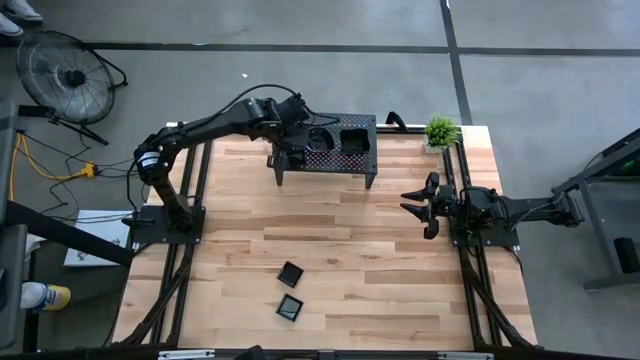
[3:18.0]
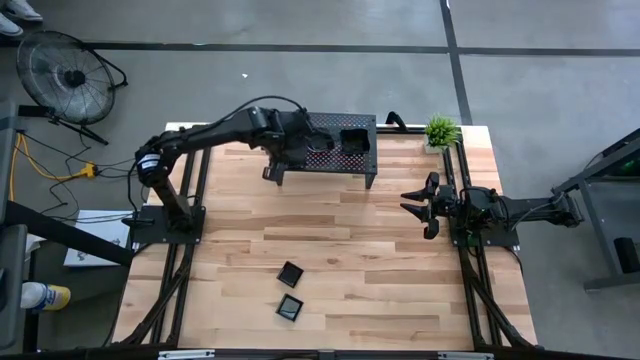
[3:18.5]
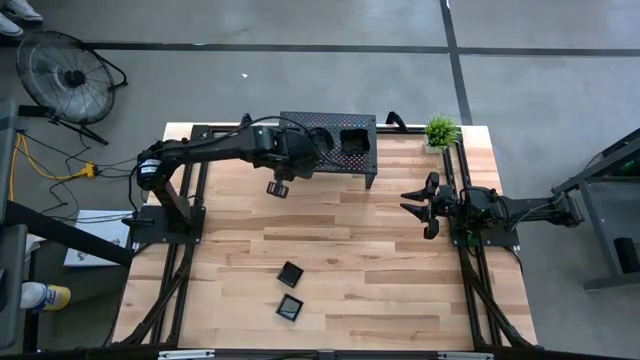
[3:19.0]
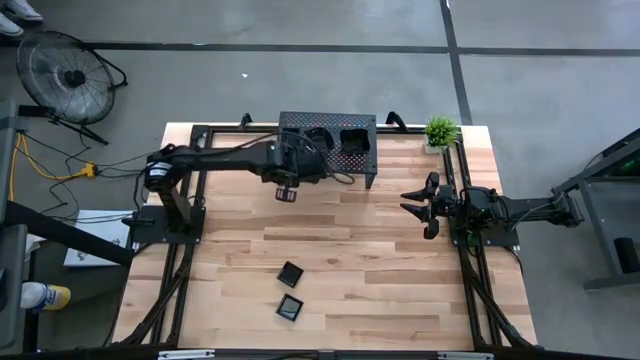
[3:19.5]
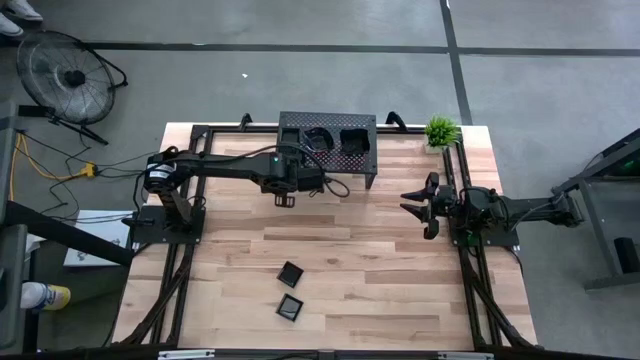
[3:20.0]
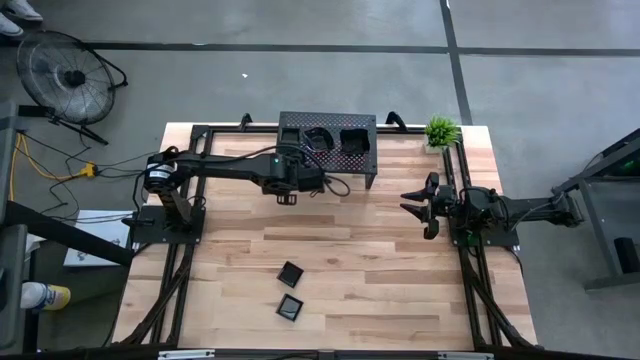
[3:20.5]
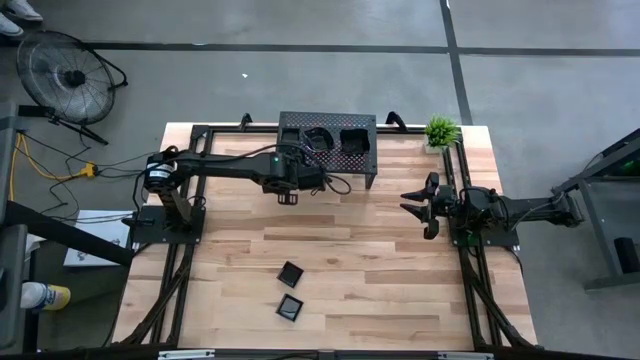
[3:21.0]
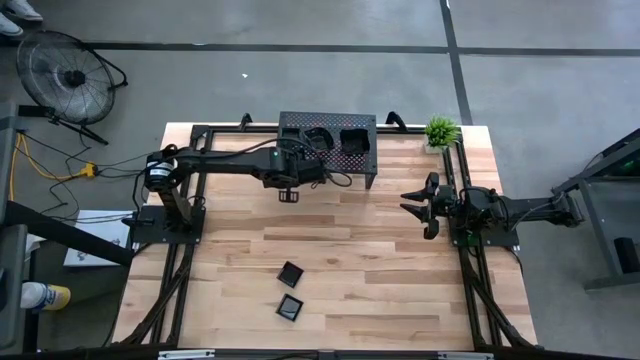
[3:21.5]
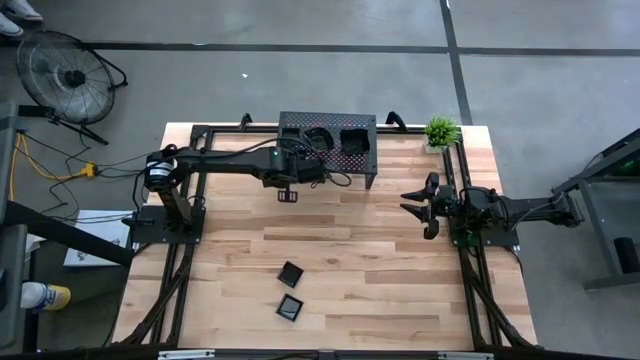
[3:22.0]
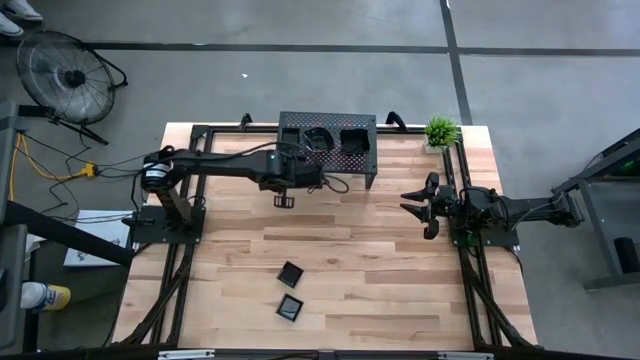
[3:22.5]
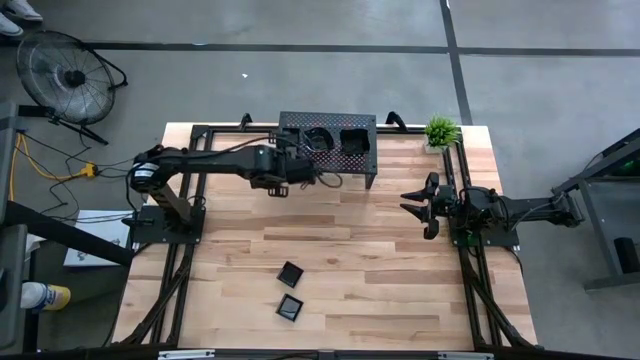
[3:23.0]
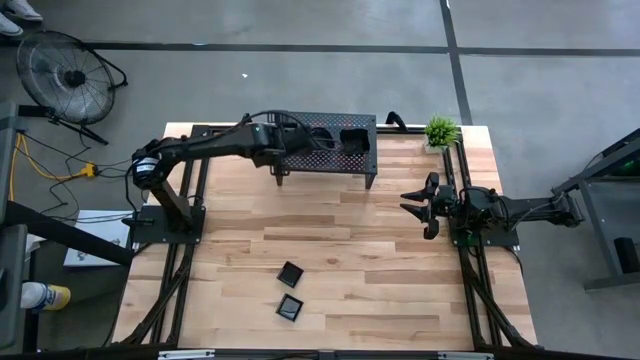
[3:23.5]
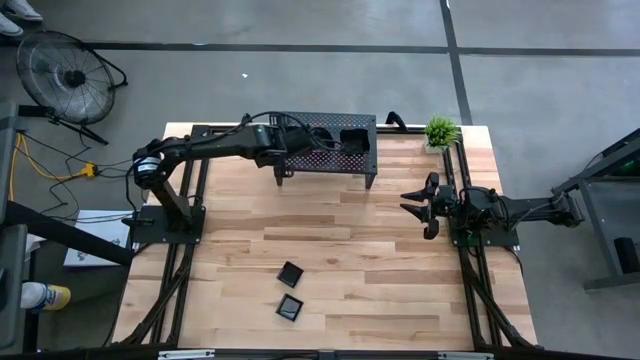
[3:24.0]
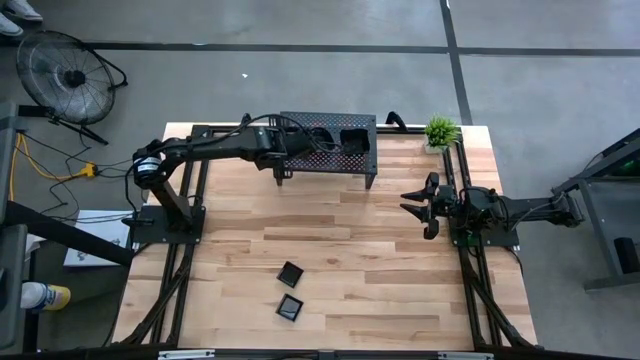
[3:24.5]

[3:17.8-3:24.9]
Task: Pick & Place Mini shaped plates
Stack the top left black square plate on top of the black square plates on the shelf

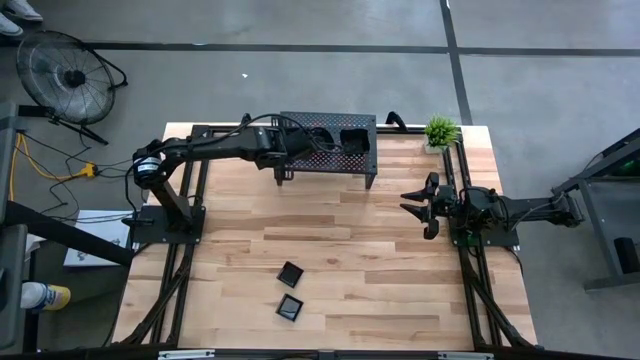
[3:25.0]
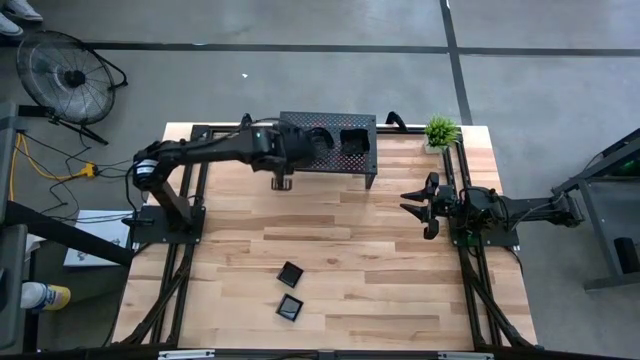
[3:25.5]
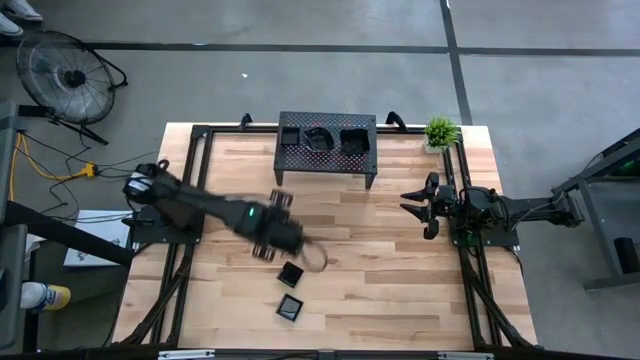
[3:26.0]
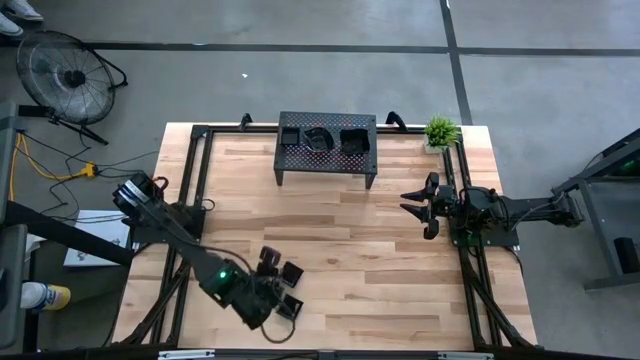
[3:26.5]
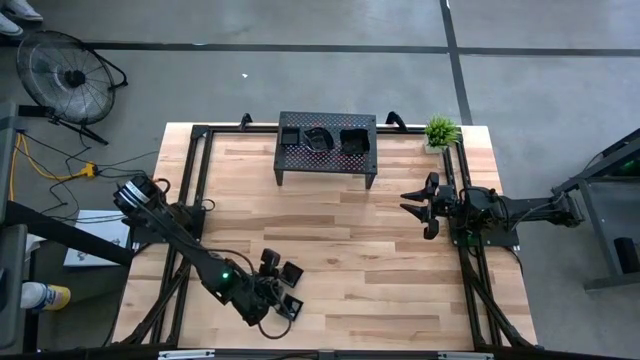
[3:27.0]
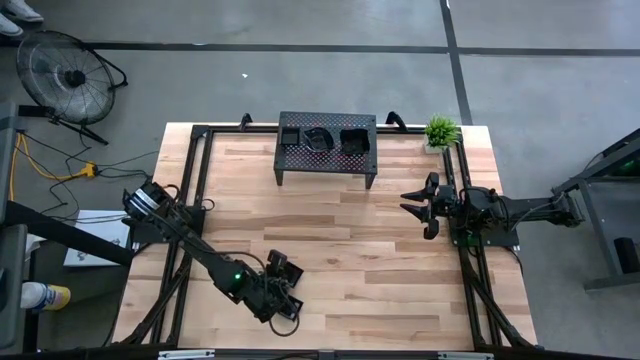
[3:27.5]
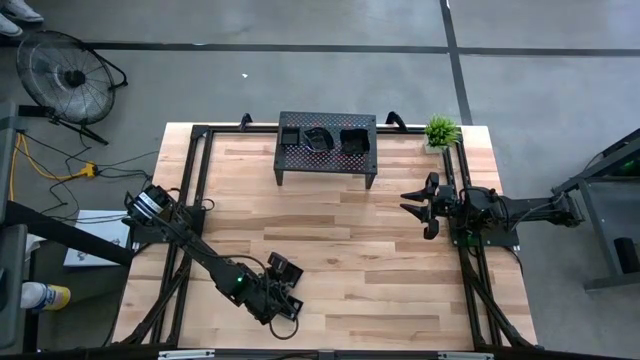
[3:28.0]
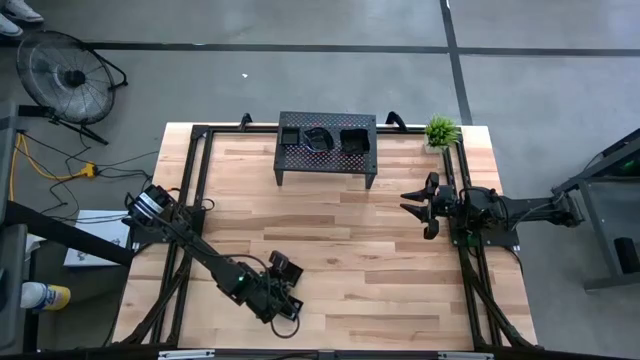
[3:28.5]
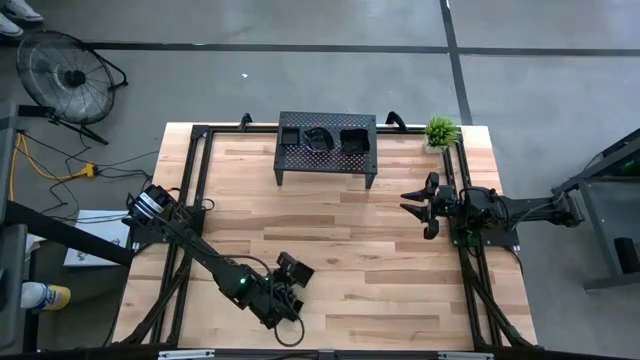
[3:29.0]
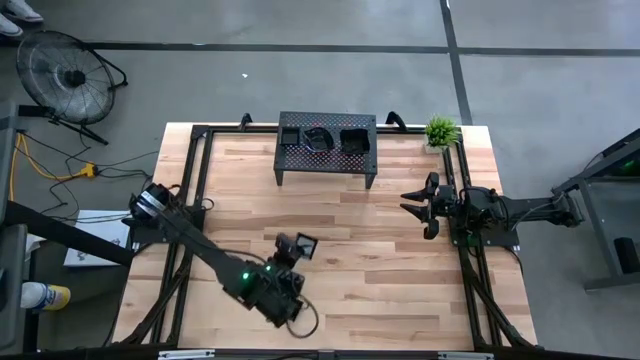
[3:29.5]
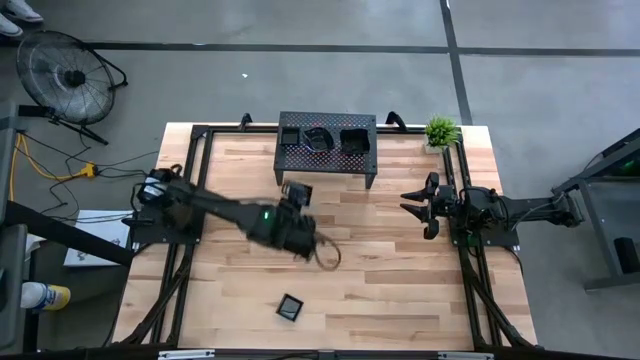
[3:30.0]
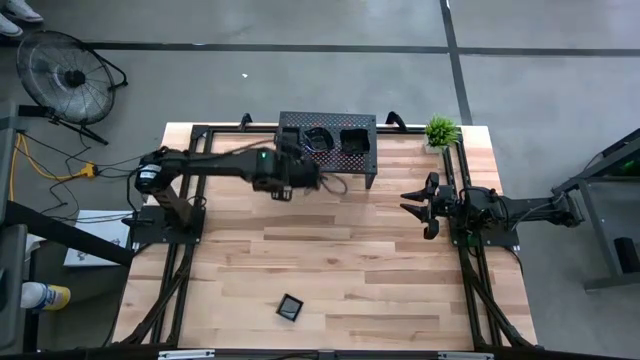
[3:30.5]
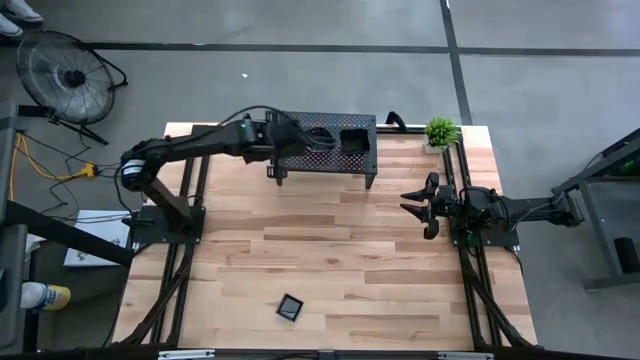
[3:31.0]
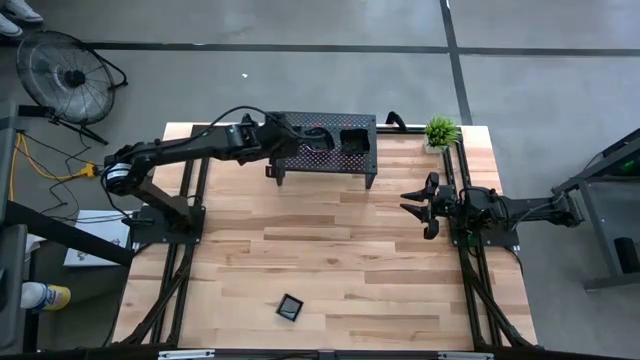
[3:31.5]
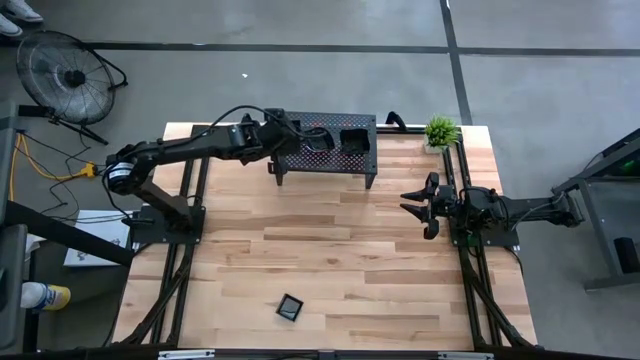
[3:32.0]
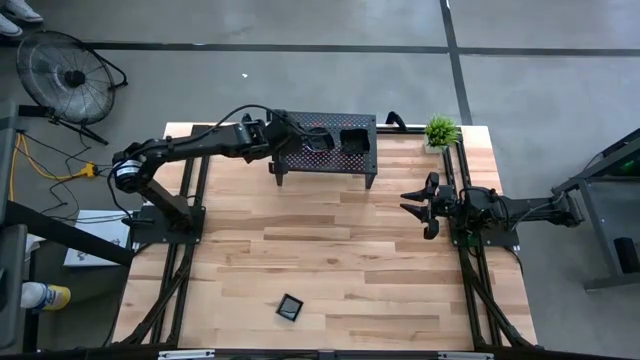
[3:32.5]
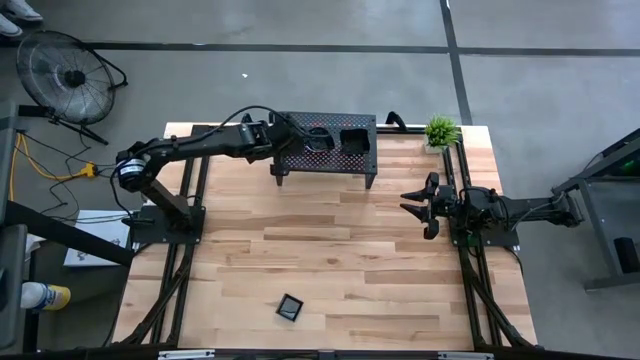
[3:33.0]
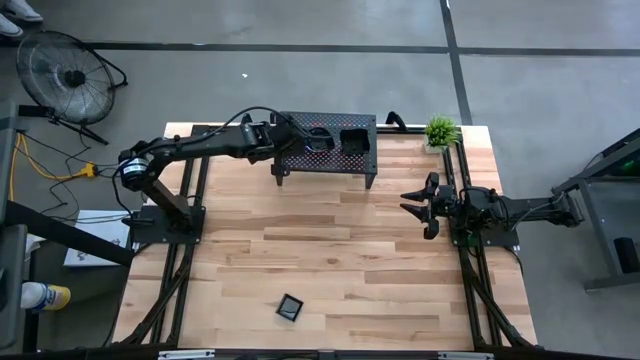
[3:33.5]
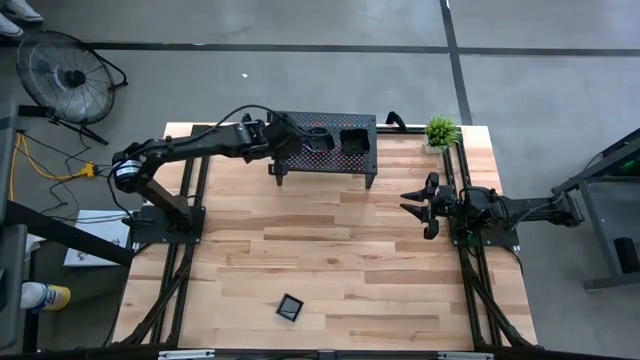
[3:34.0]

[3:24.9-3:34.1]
Stack the top black square plate on top of the black square plates on the shelf

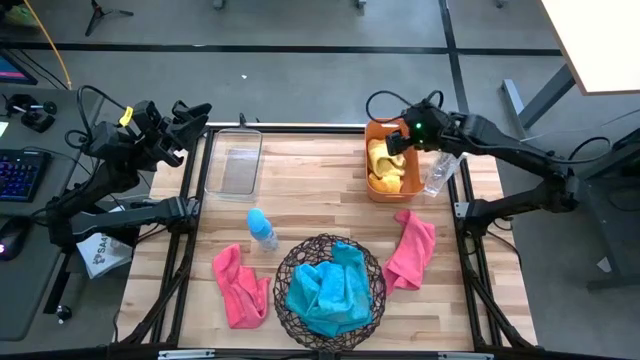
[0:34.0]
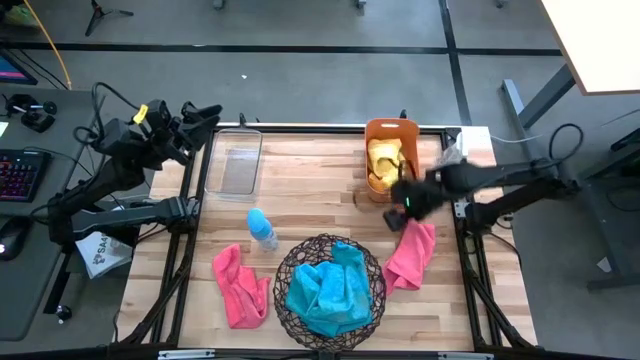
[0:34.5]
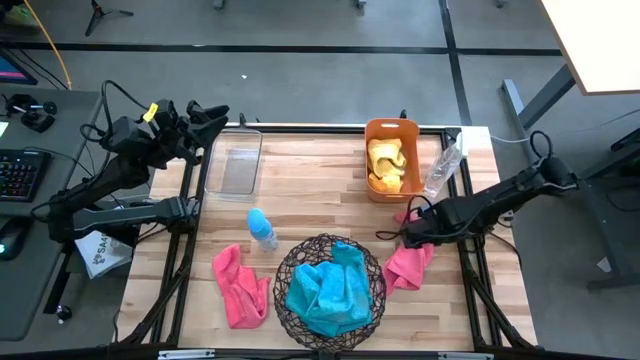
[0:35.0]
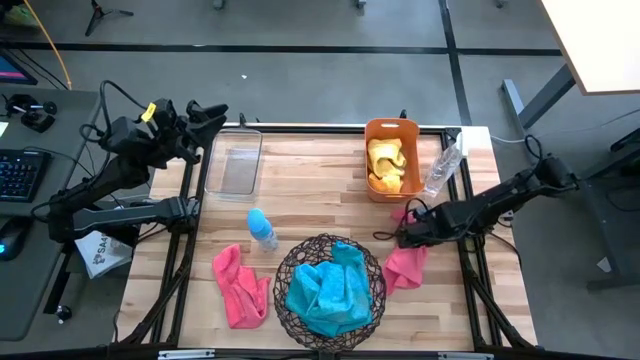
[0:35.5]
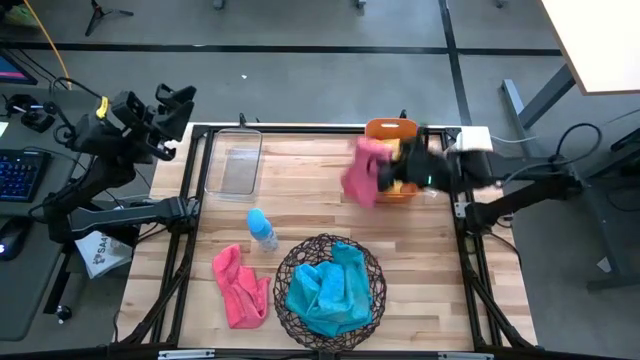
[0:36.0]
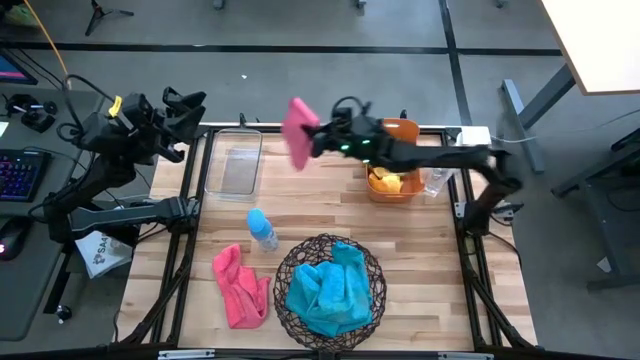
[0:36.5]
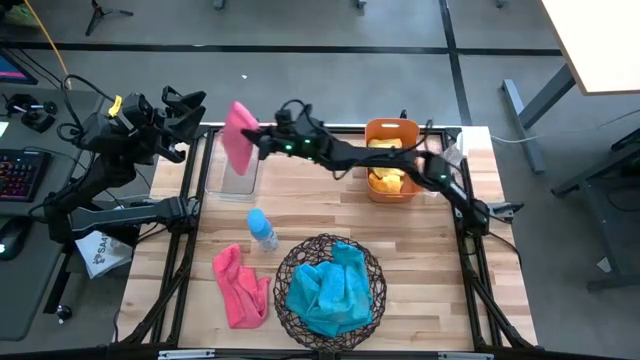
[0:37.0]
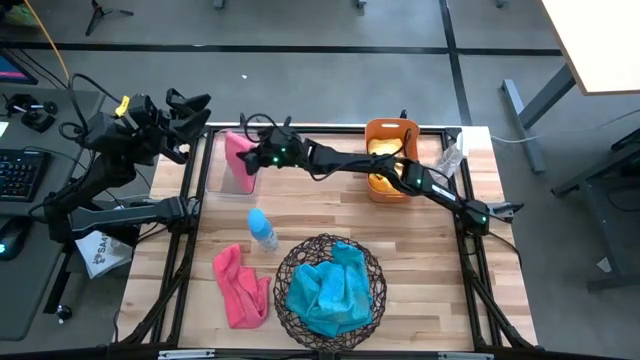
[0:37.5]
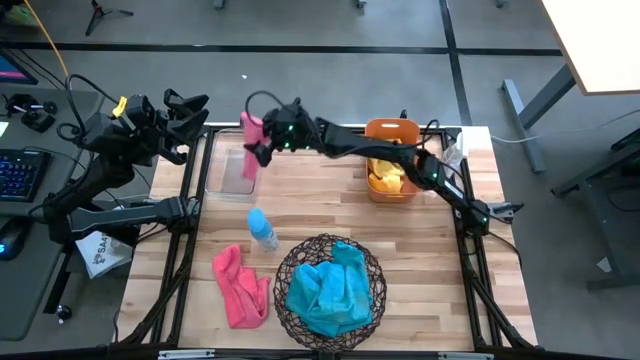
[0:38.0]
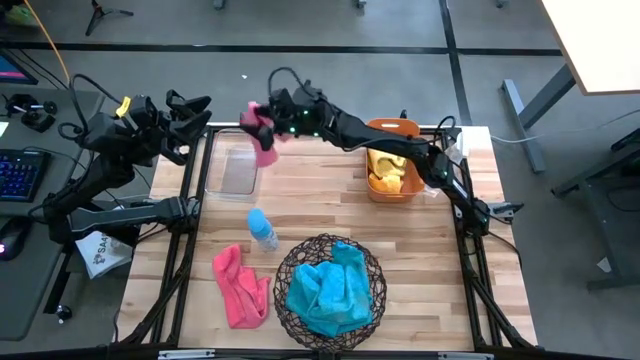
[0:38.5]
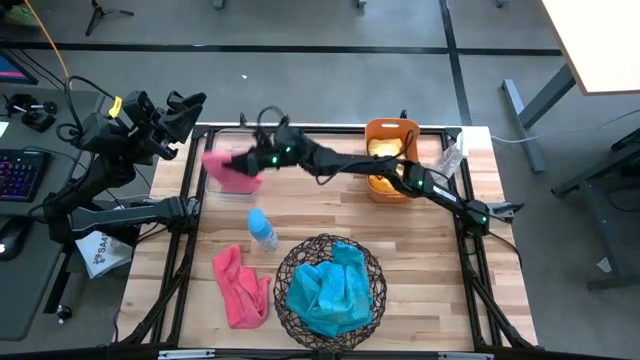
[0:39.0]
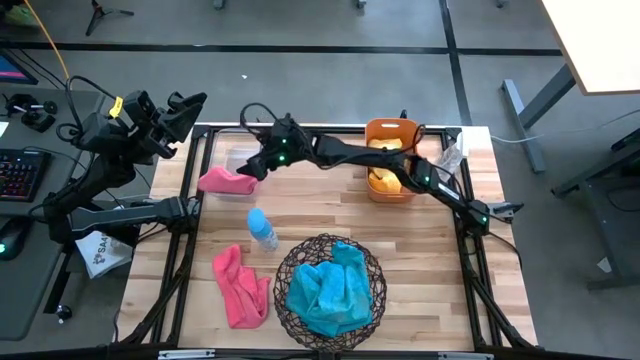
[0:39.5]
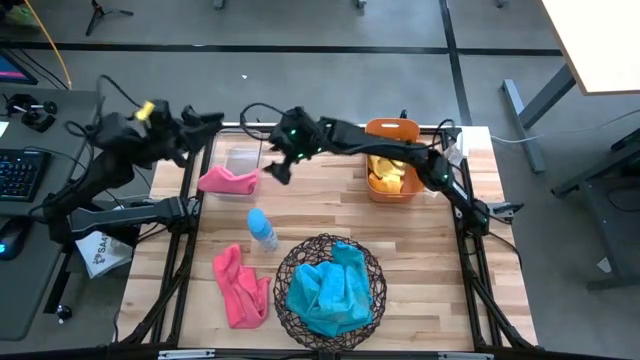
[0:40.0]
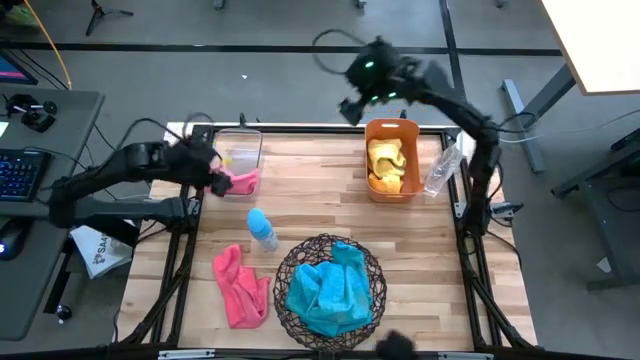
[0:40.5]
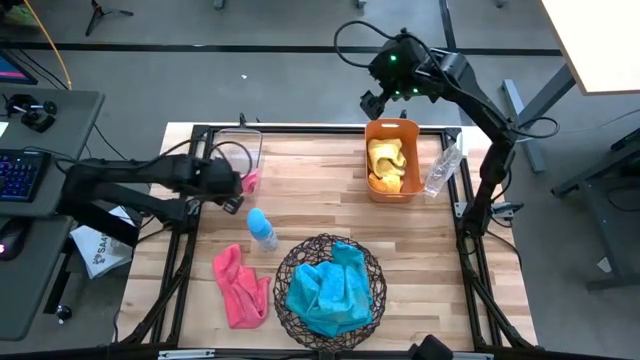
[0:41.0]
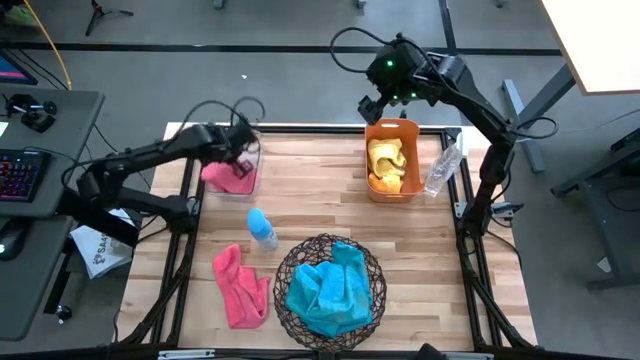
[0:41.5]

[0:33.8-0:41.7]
Task: Sort microfiber towel by color & place in baskets
Put the right pink towel into the transparent bin
